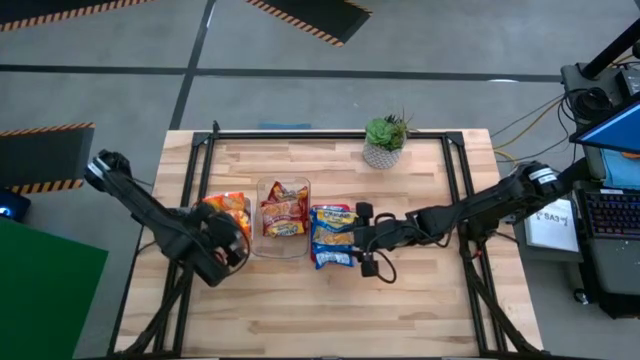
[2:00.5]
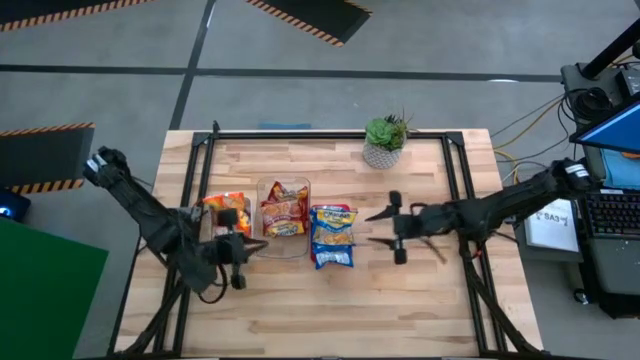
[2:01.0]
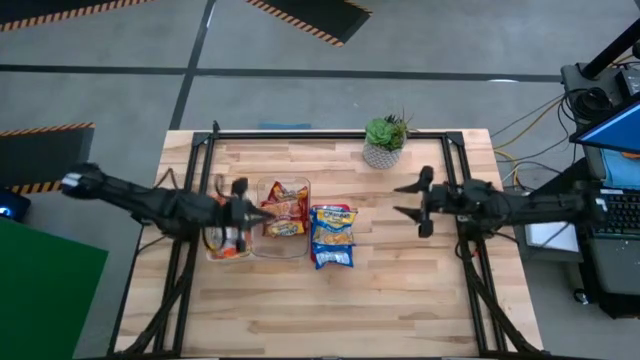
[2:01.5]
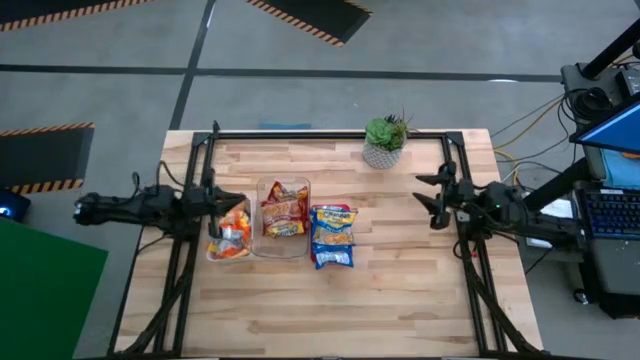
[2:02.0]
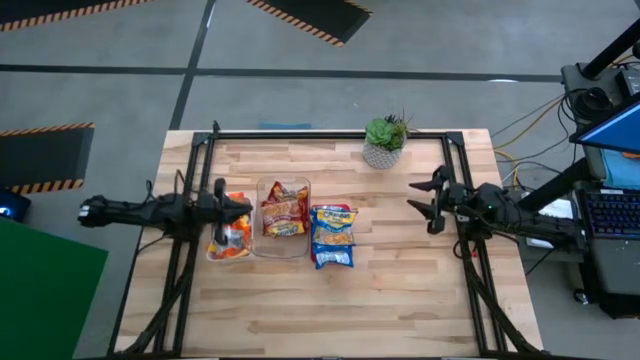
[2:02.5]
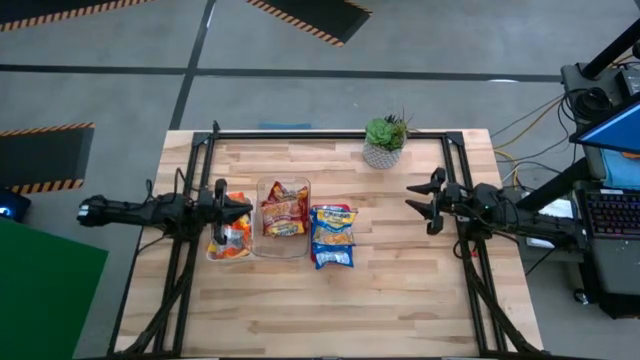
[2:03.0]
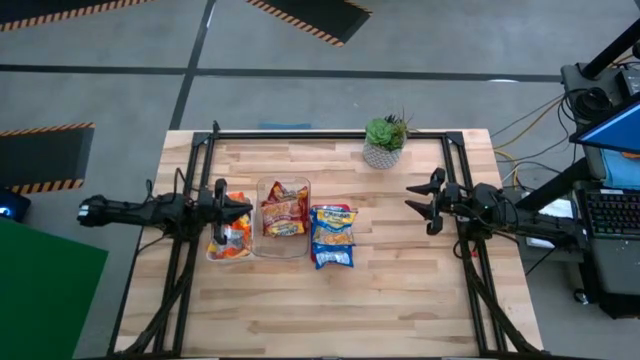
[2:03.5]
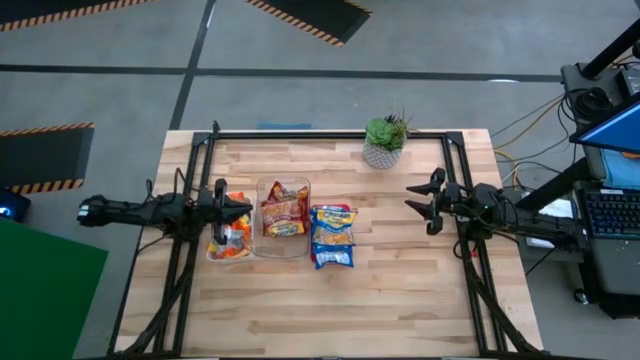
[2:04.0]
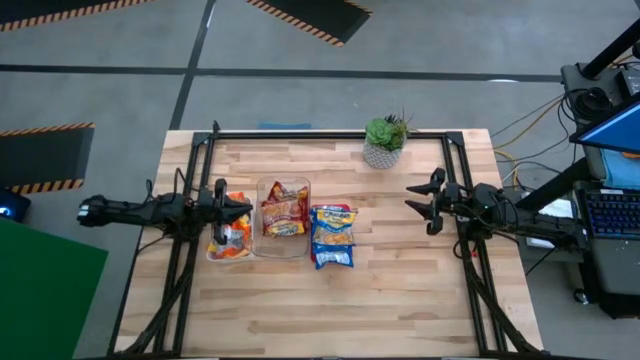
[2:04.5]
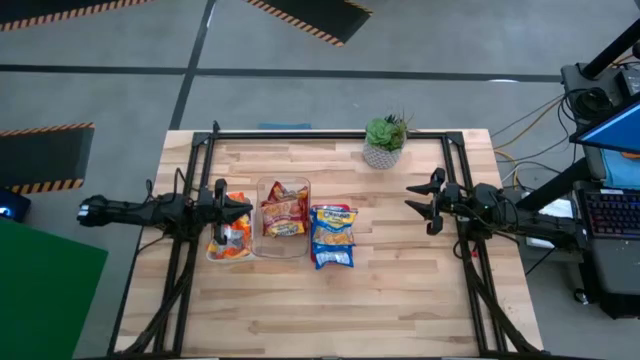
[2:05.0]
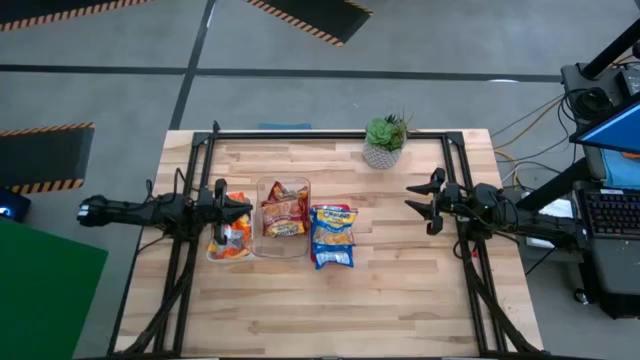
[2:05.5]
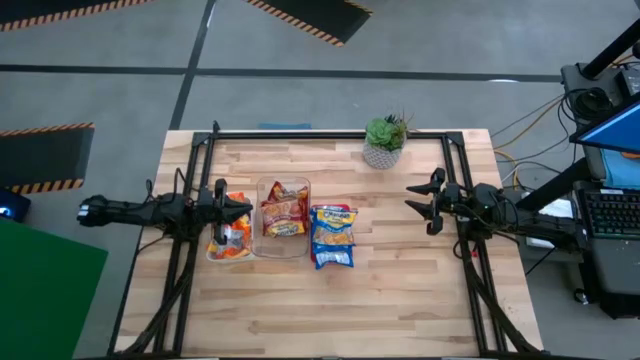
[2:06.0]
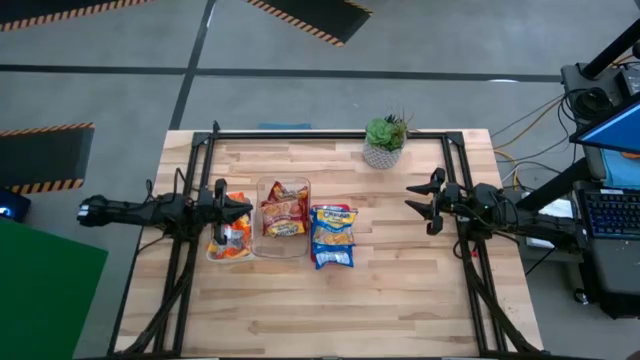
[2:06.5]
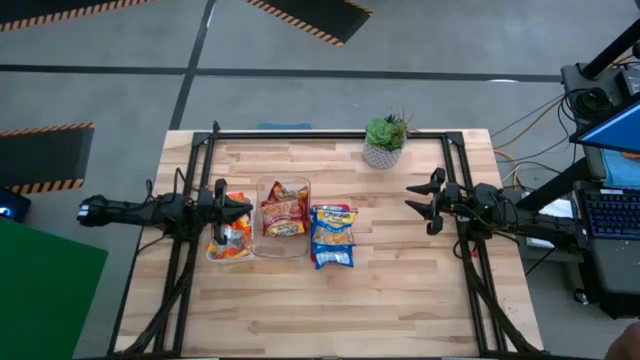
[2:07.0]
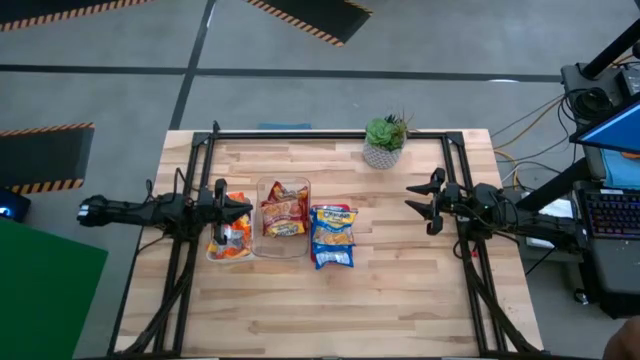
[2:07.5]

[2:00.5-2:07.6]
Task: Sort Maruchan noodles
Return to Home Position

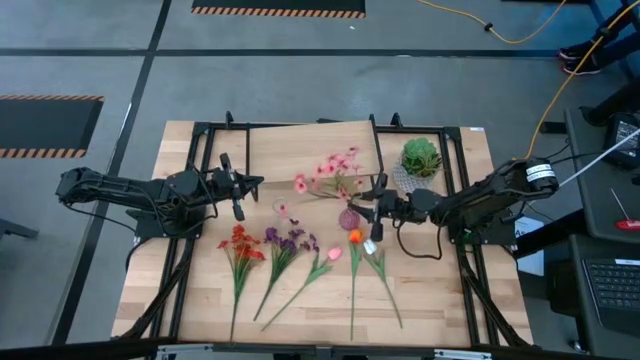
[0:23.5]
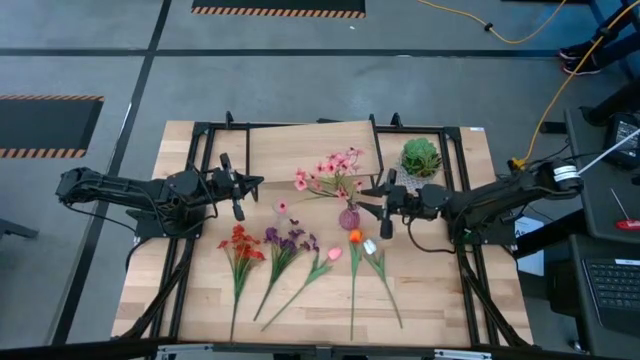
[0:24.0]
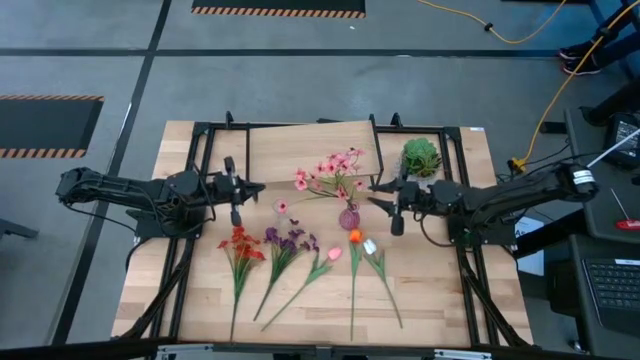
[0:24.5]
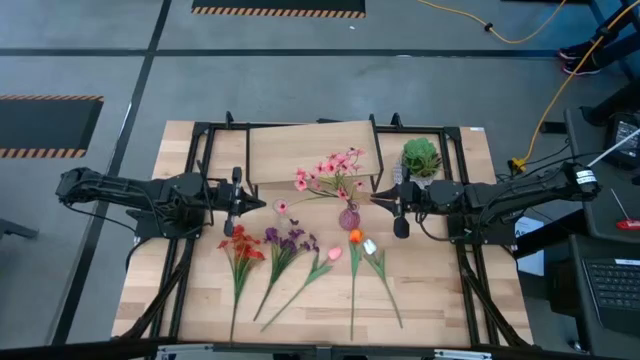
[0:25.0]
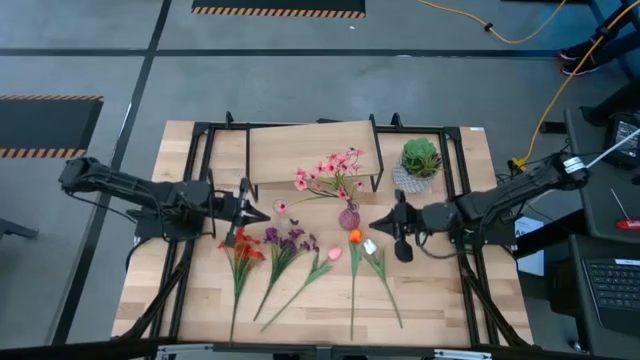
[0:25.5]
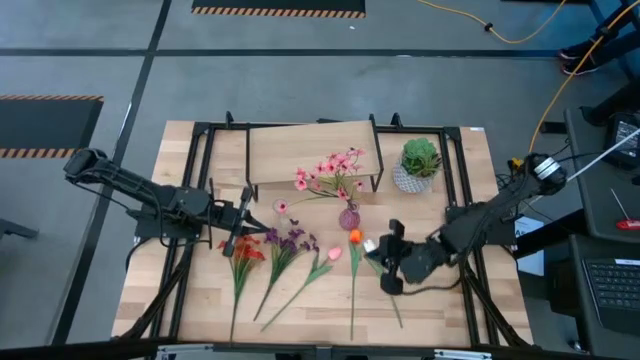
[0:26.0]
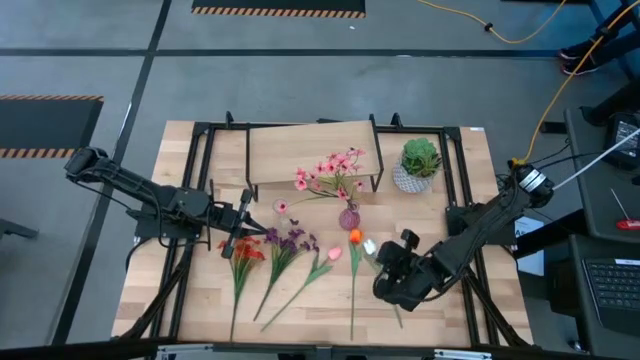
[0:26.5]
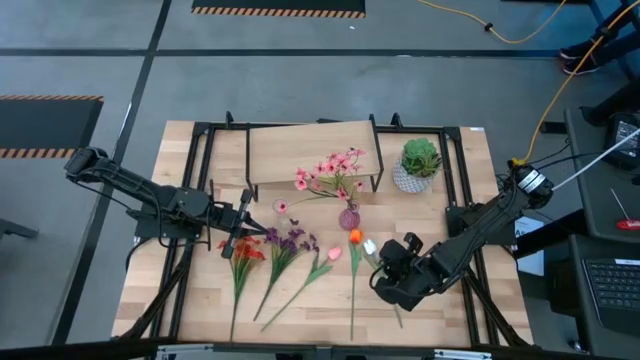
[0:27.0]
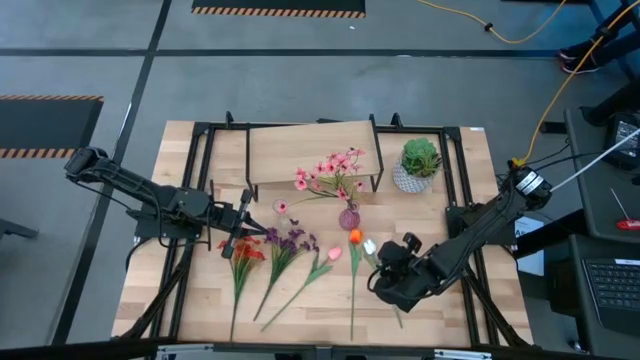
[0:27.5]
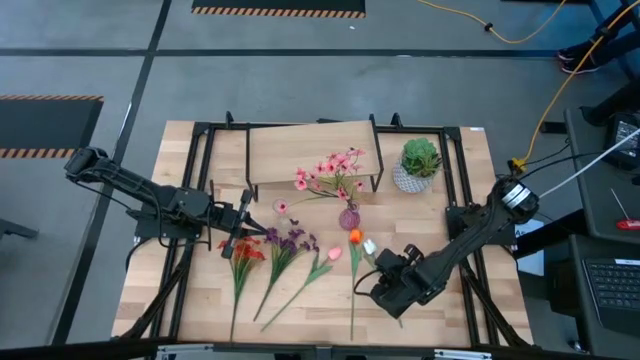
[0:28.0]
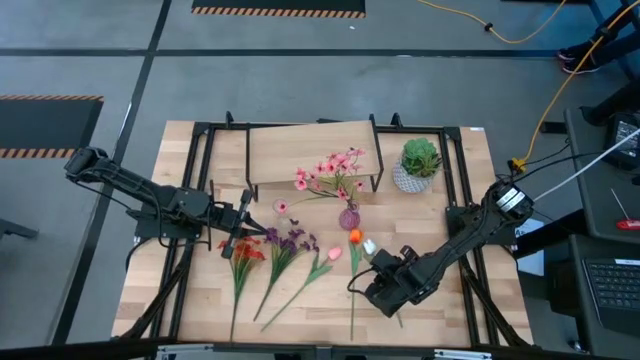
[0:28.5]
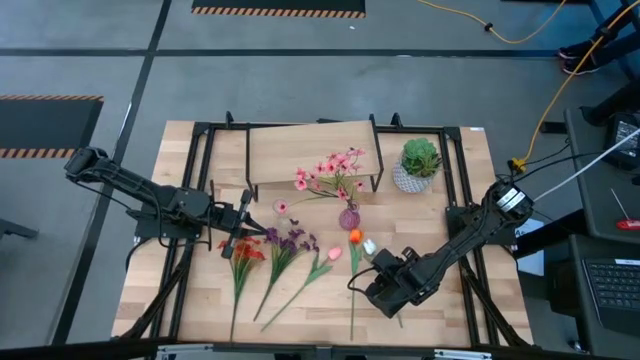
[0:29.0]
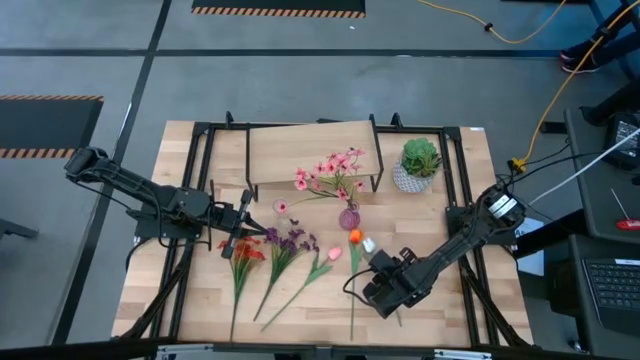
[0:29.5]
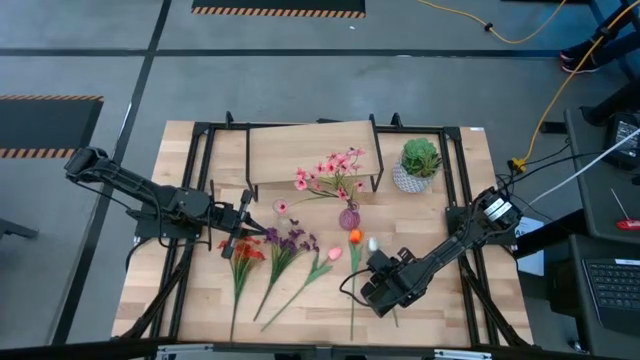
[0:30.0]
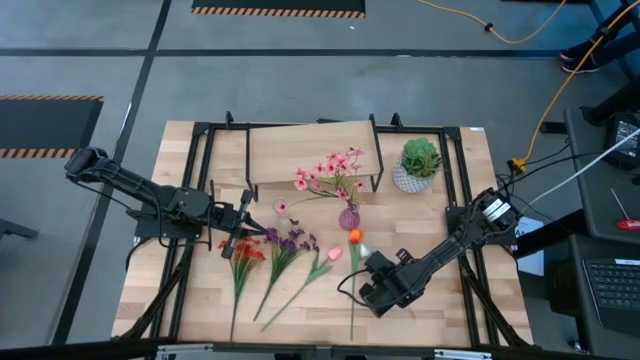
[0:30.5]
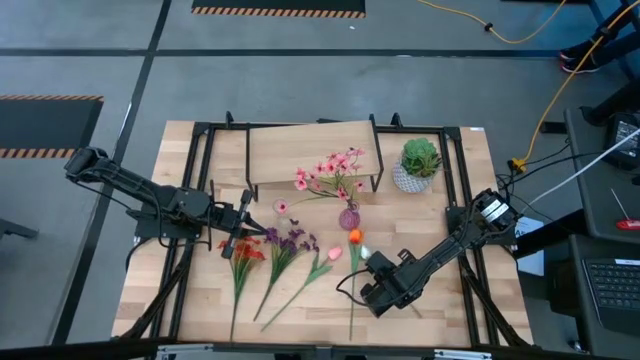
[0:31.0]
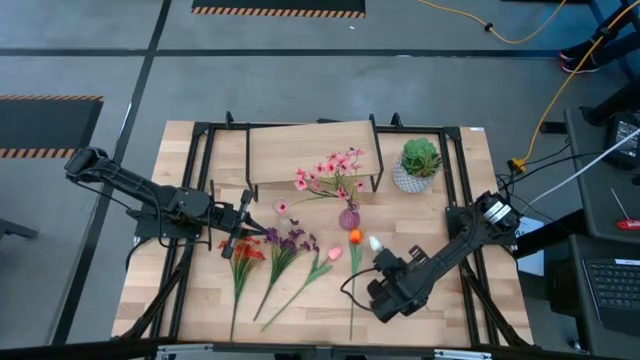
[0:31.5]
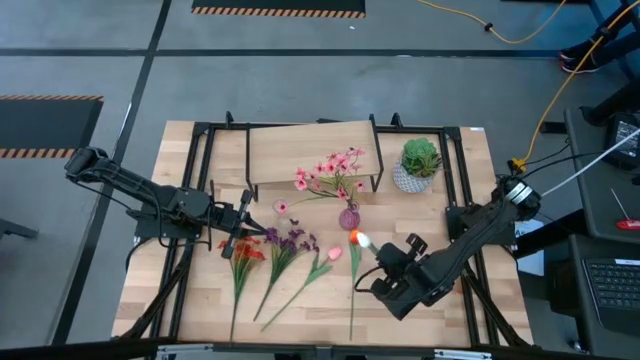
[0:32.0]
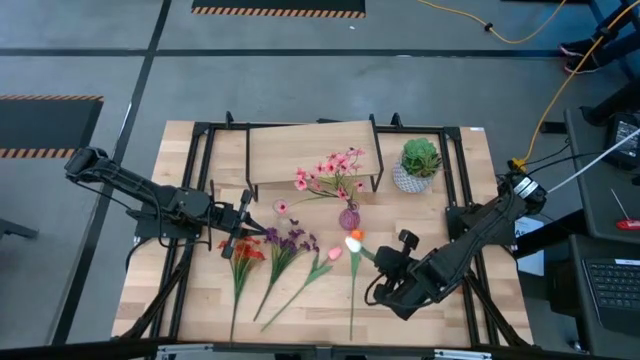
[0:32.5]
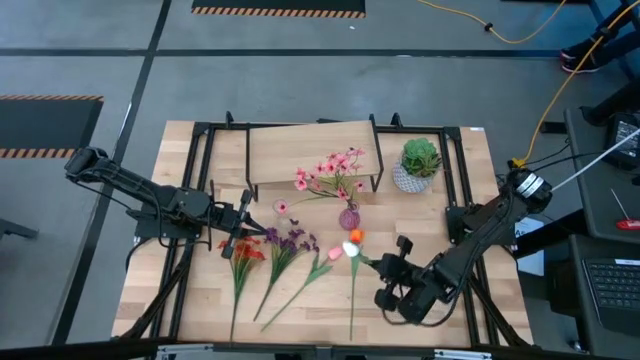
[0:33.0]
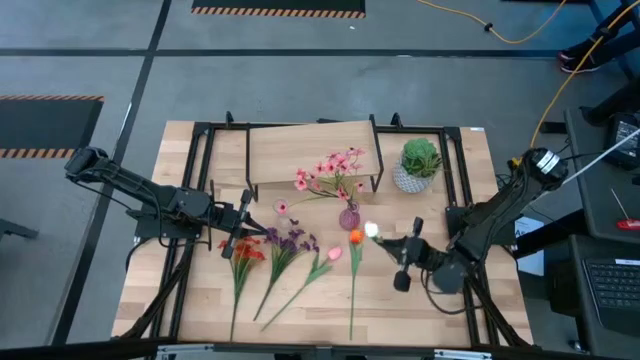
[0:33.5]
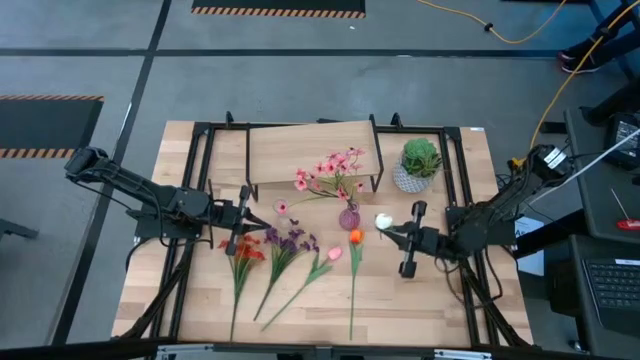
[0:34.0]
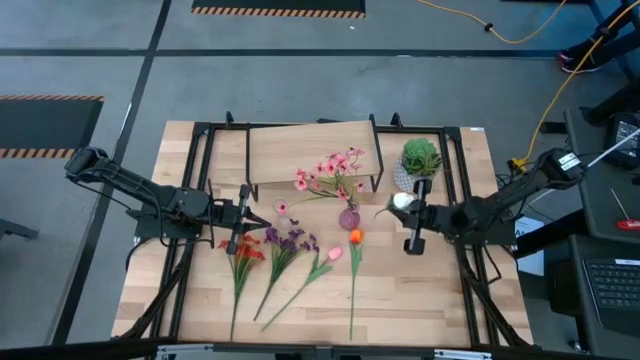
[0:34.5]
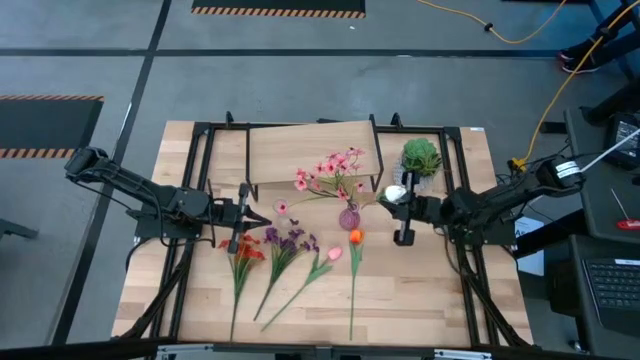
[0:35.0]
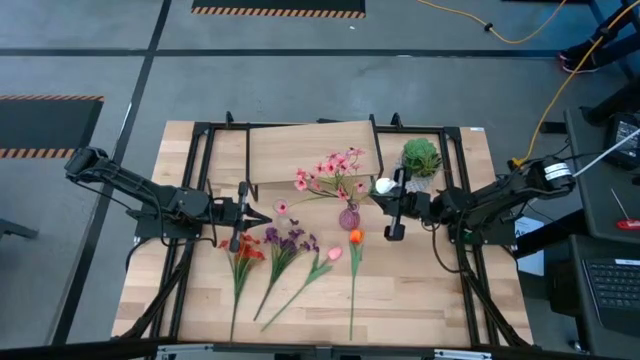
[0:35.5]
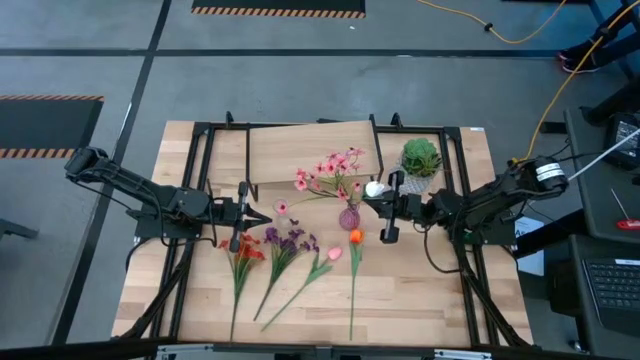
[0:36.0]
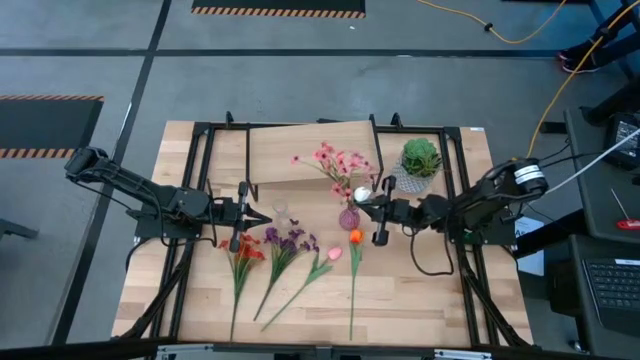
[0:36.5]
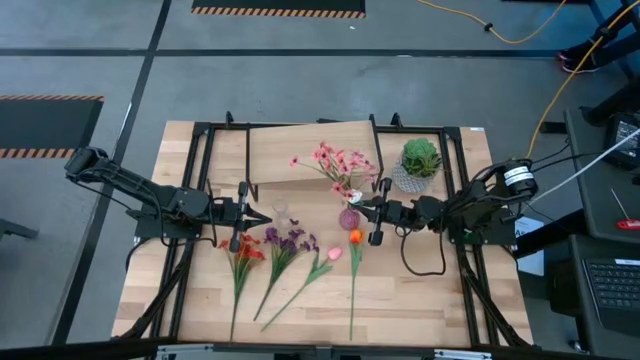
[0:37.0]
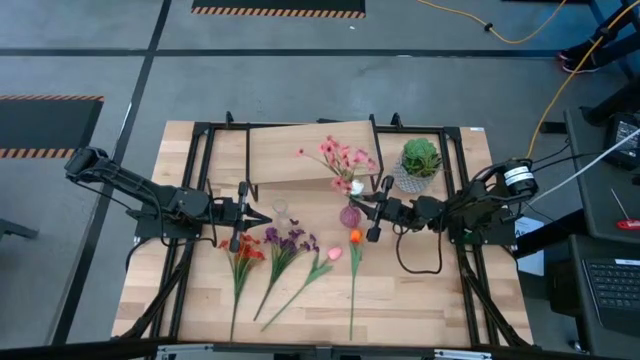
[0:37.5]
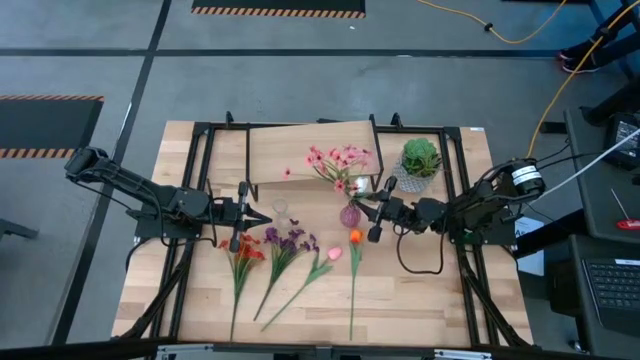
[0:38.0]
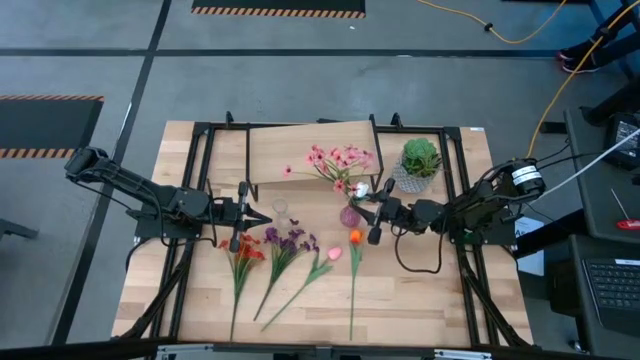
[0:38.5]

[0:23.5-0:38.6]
Task: Pick and place flowers into a vace then onto a shelf
Put the white flower into the pink vase
